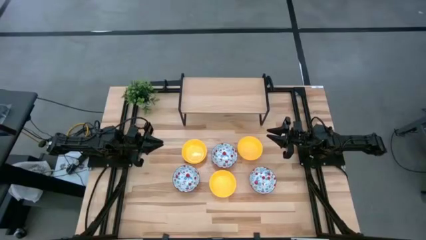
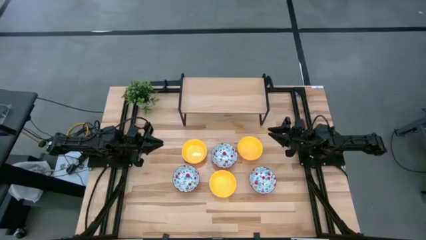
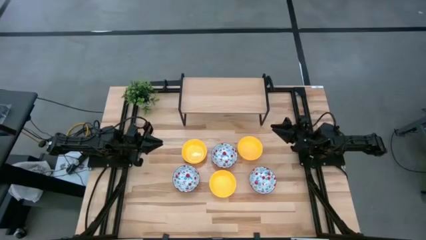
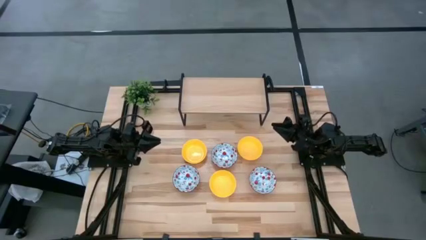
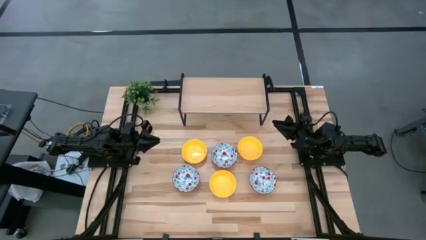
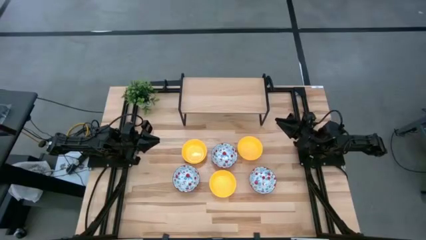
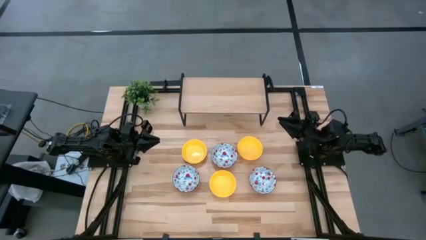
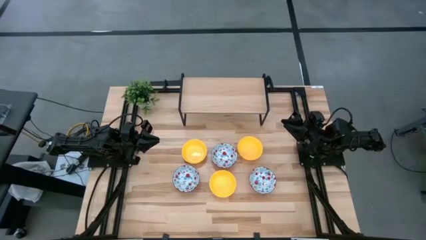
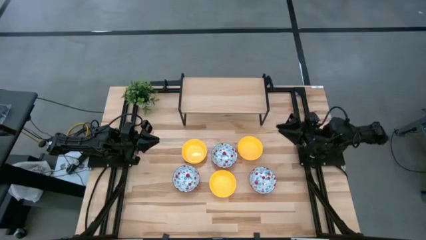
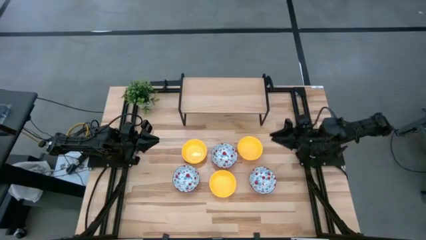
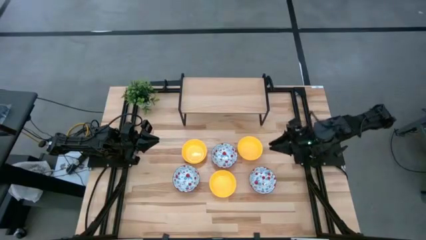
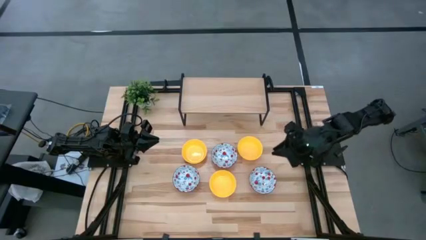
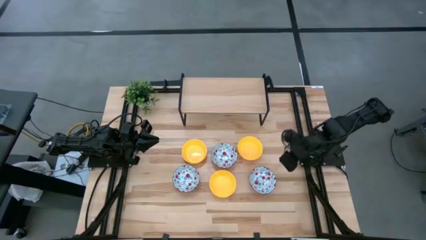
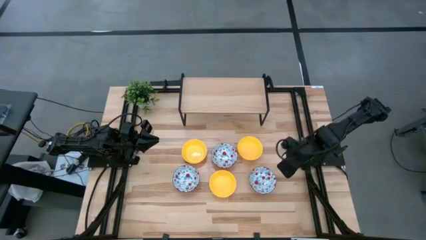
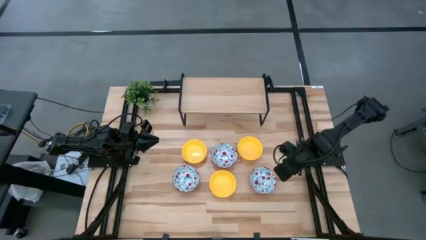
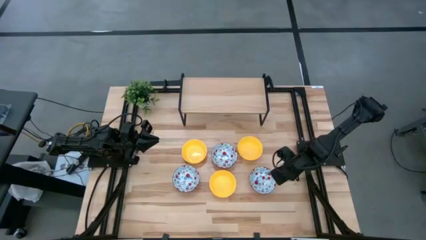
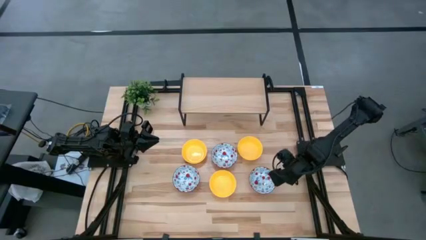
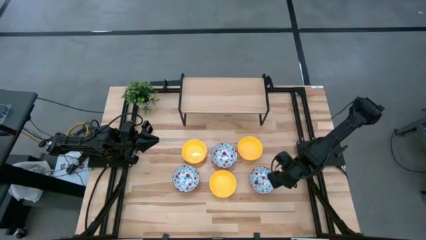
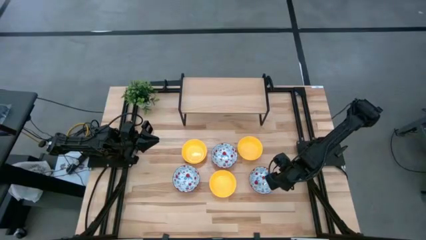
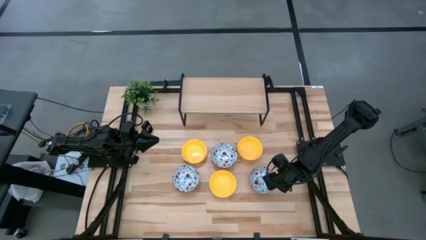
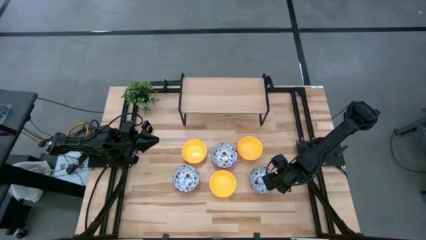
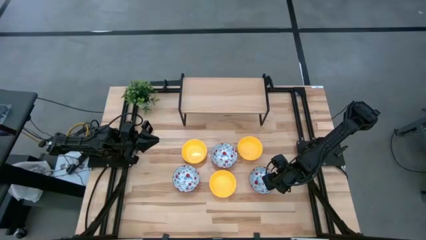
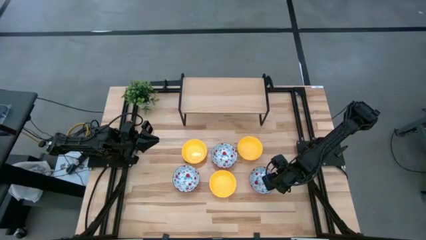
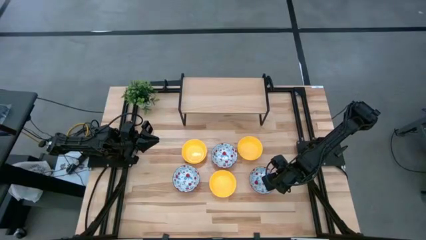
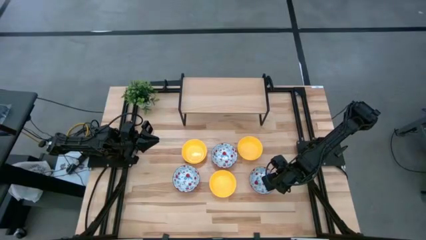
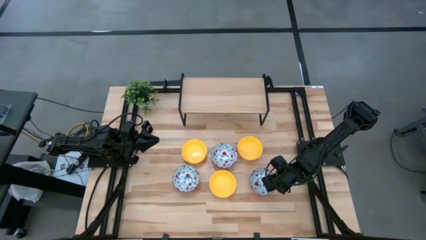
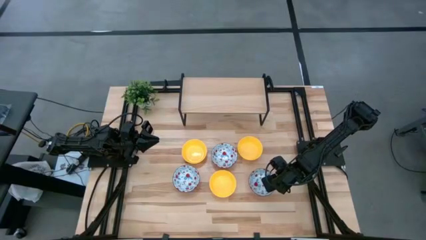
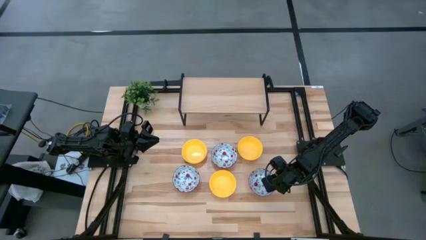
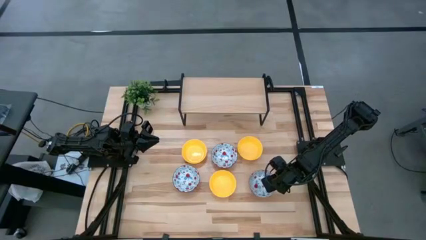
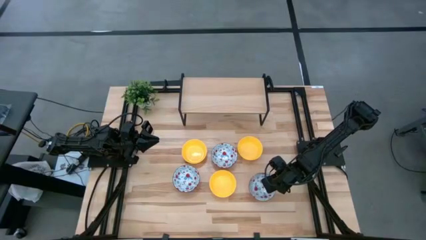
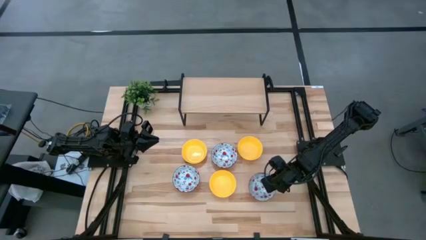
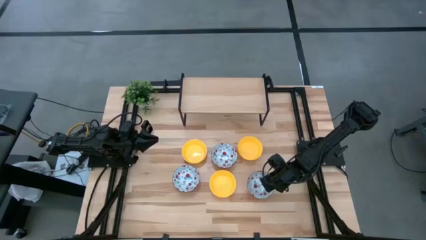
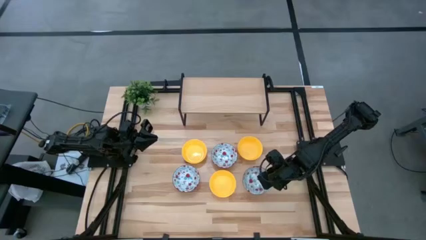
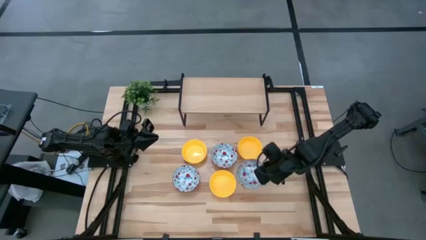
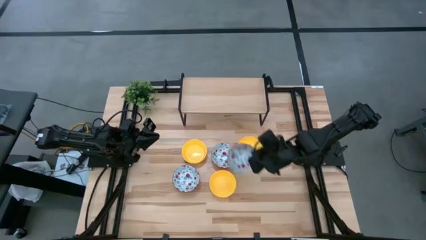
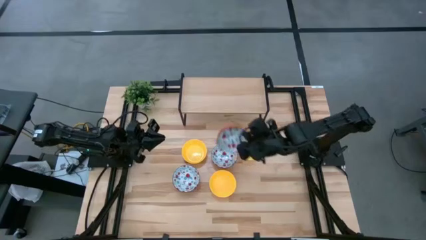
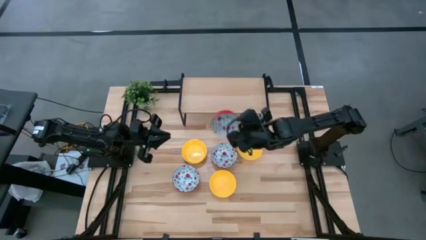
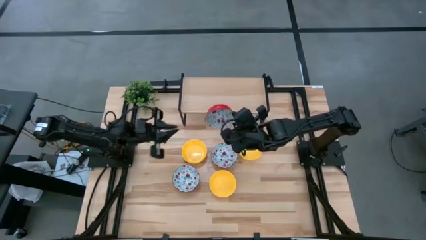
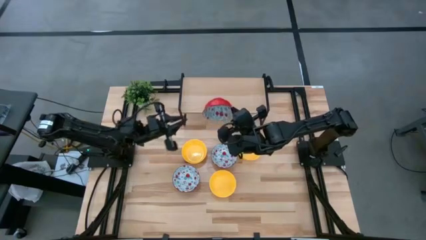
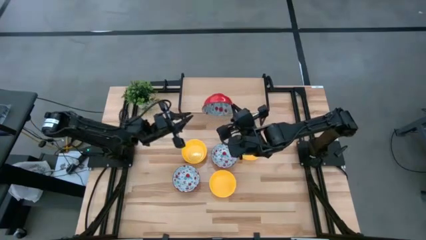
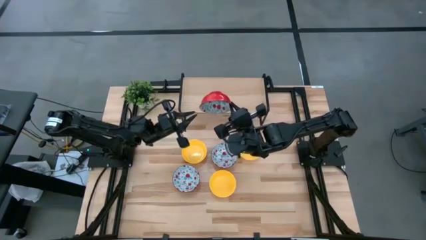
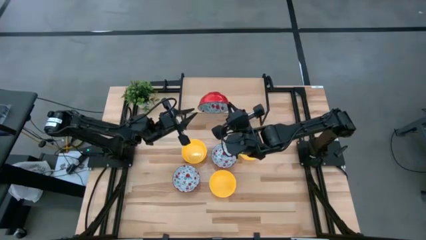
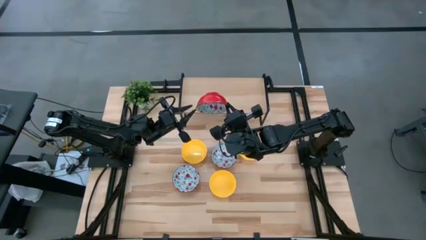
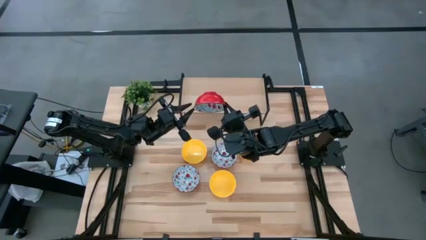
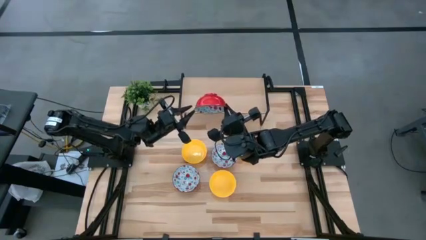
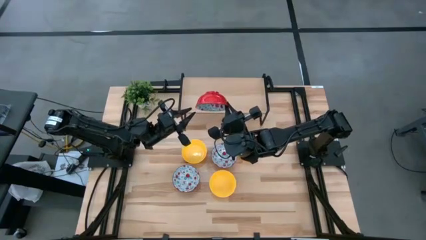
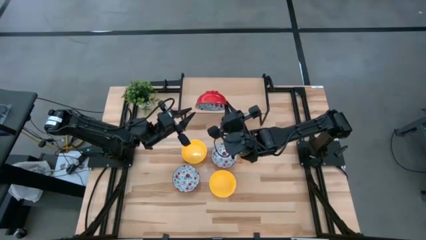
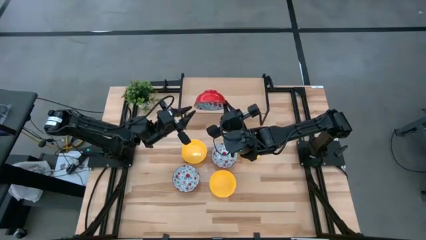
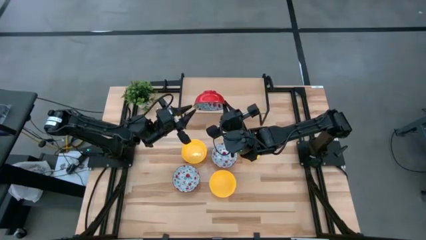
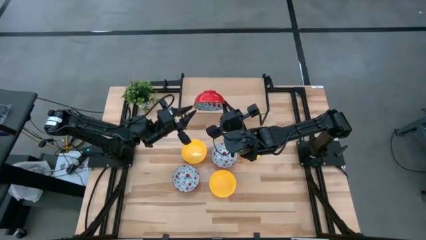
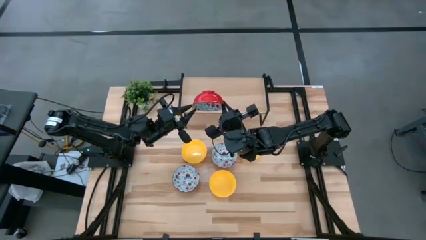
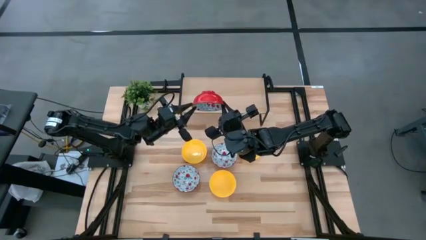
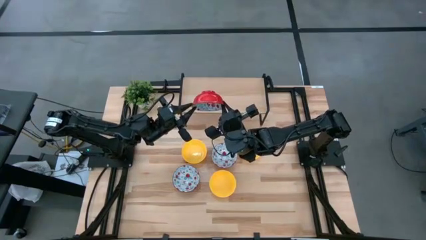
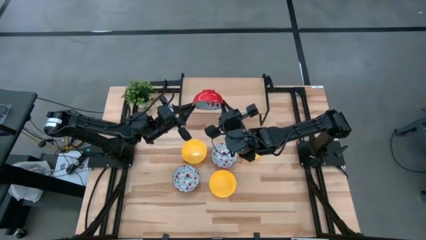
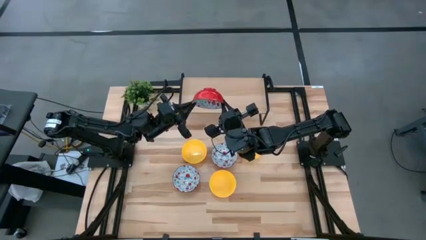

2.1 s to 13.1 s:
Task: Pick & Place Mini bowls
Put the right white bowl on the shelf
